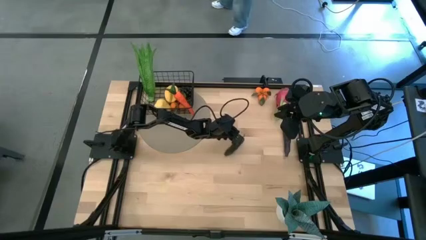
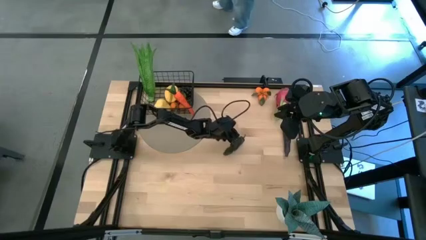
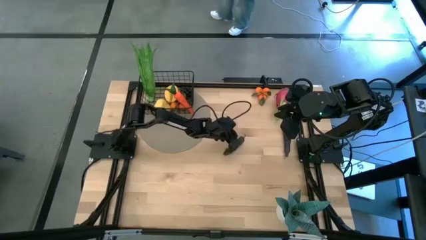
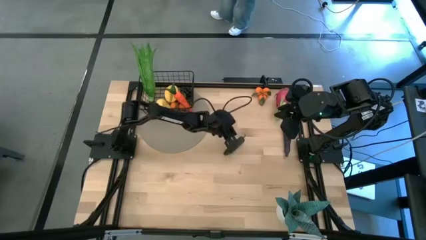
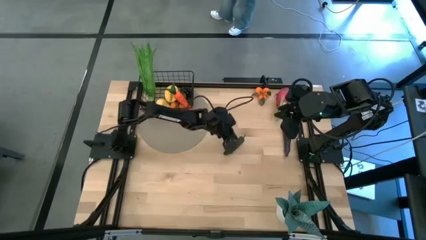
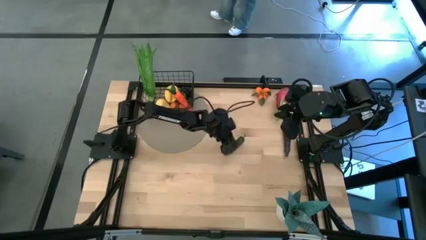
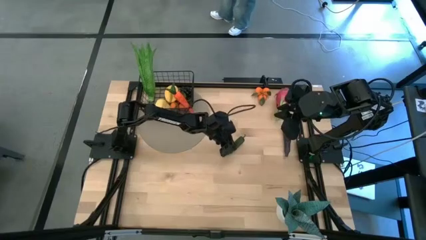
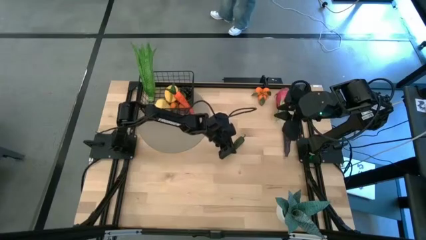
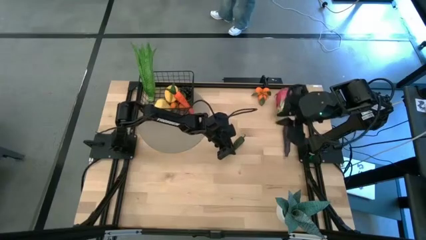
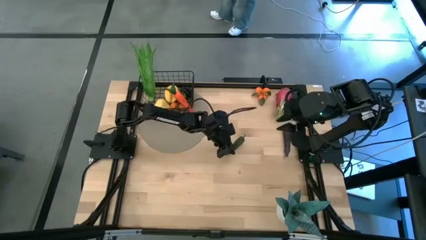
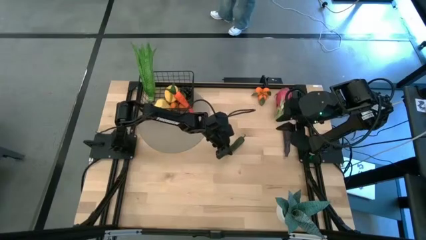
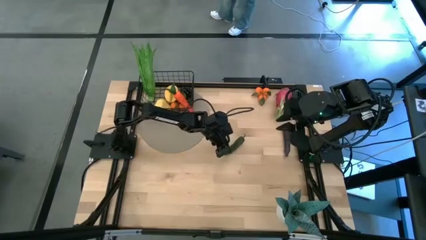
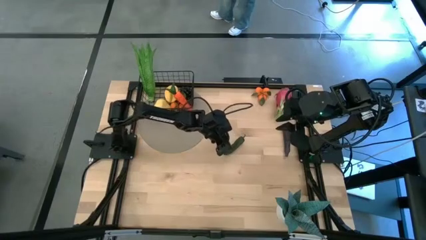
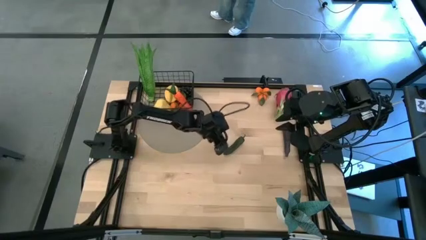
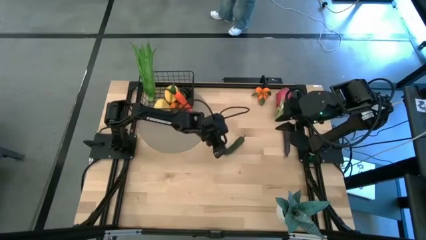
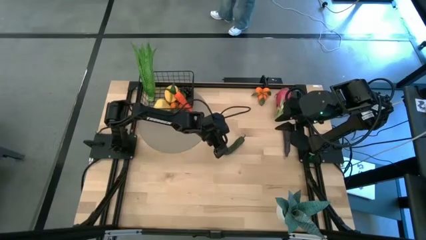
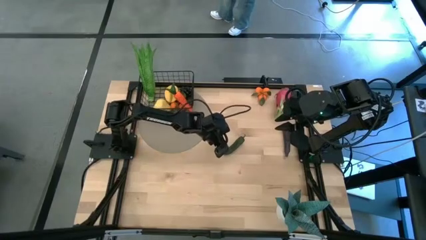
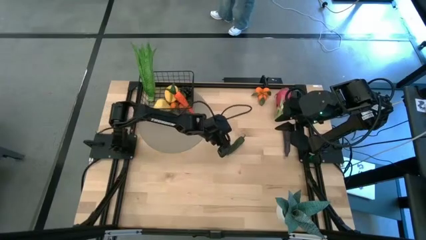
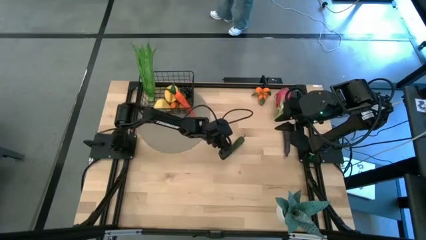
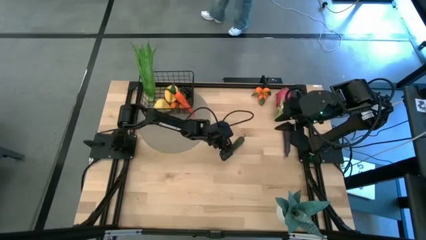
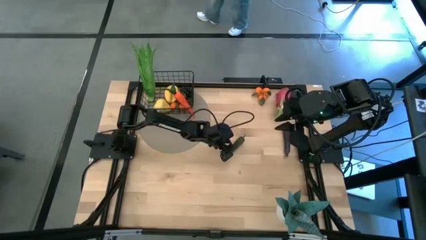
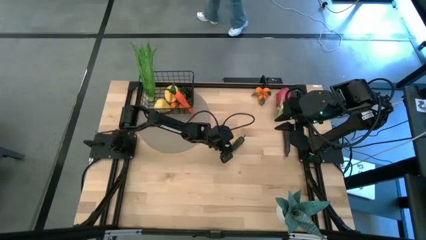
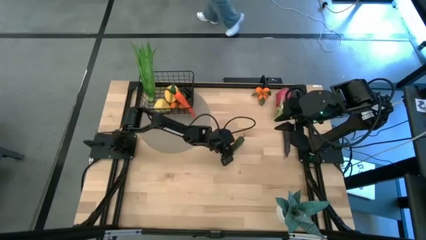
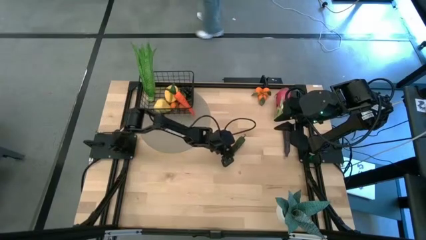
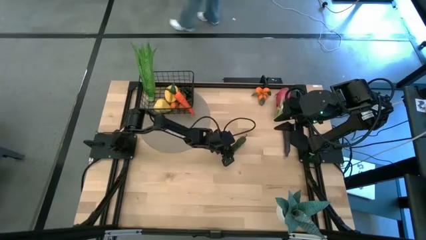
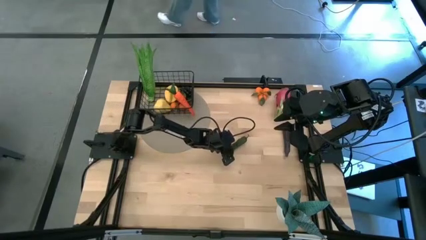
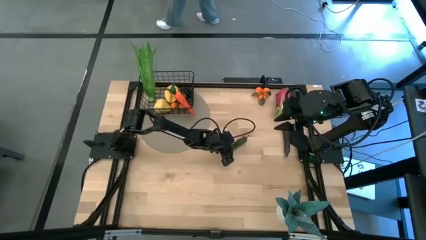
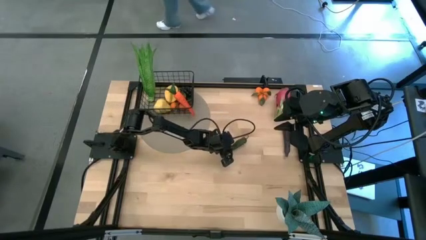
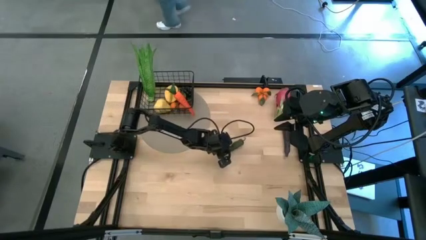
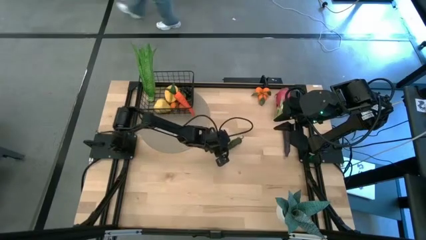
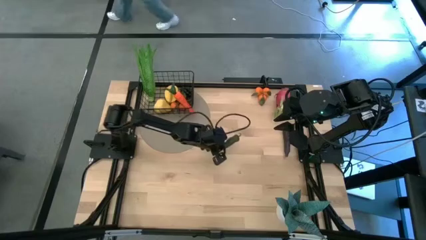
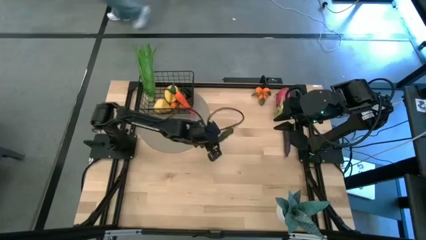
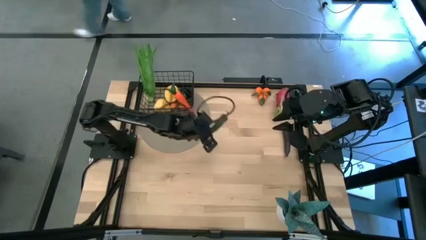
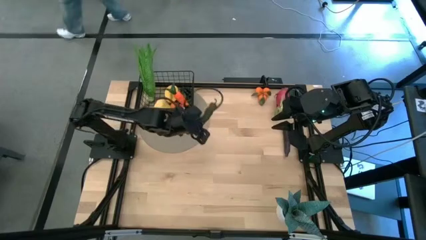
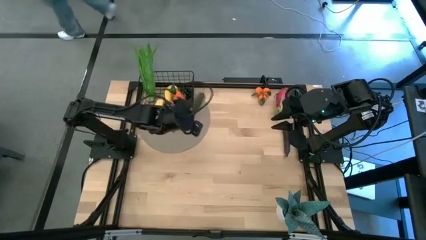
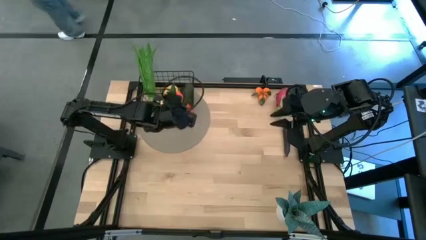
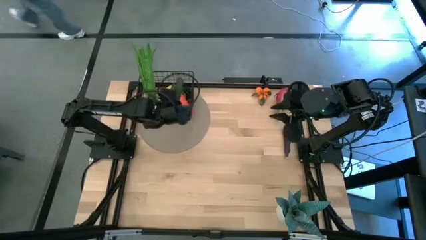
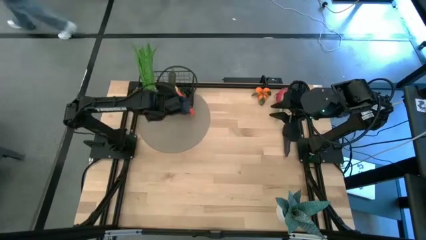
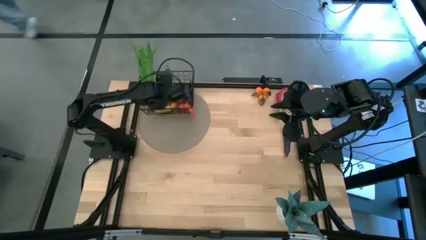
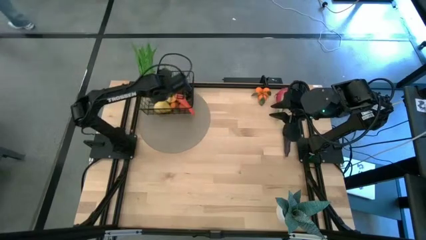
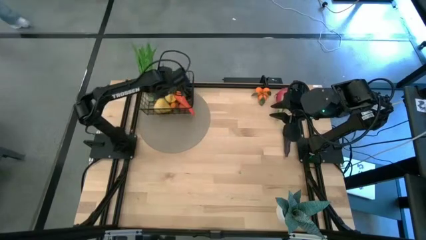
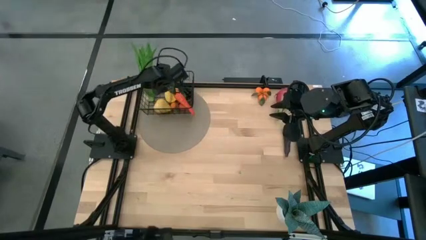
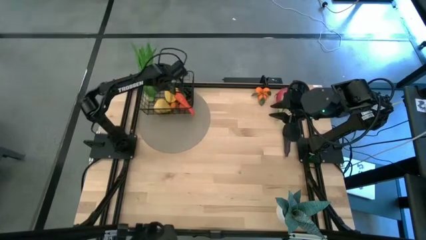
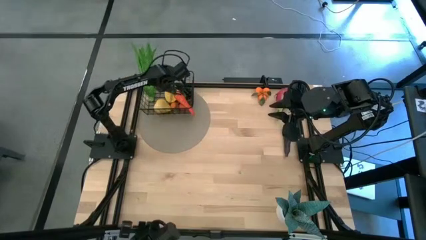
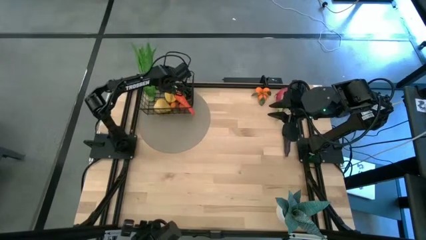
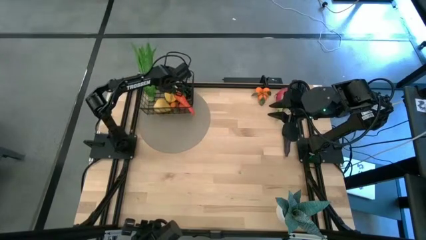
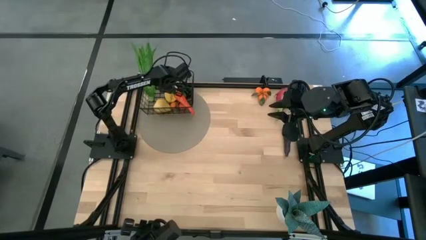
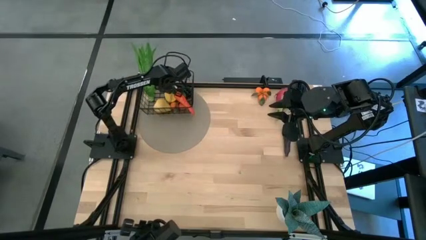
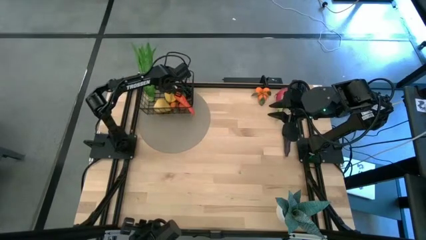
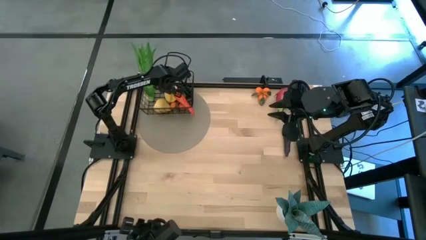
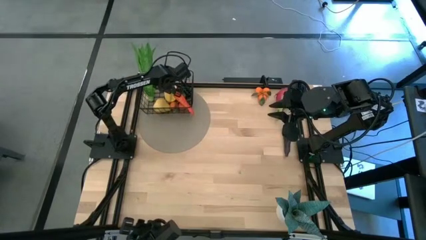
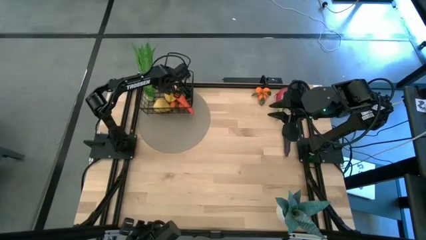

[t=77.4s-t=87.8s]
Task: Build produce basket
Put the green chili pepper into the wire basket
